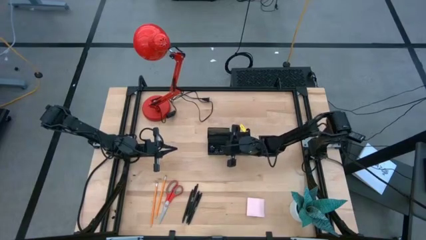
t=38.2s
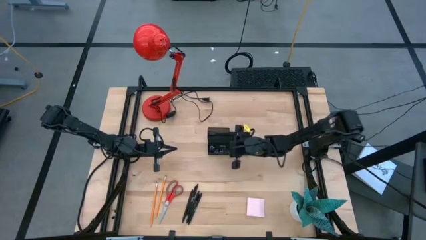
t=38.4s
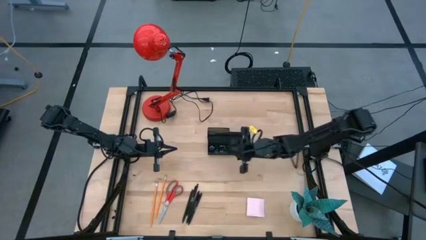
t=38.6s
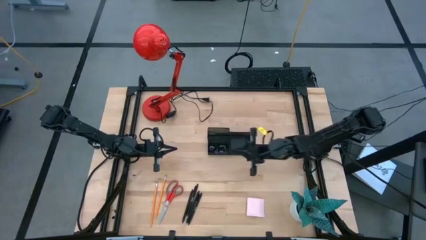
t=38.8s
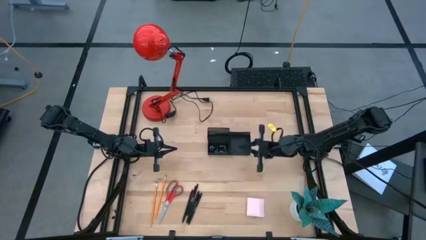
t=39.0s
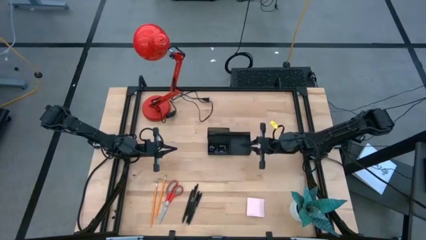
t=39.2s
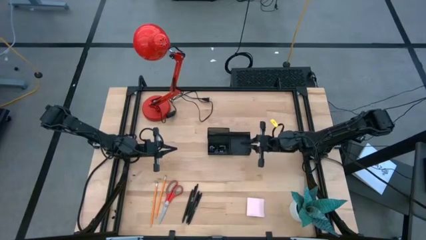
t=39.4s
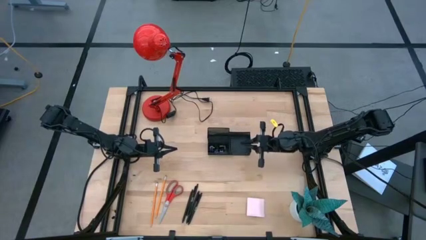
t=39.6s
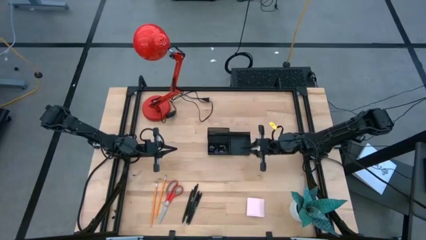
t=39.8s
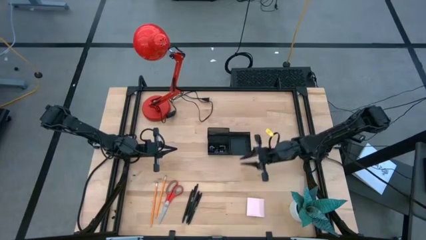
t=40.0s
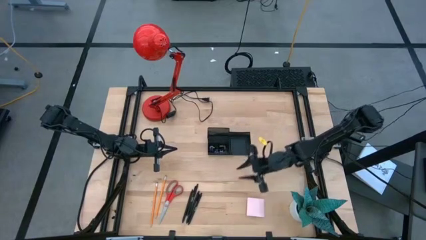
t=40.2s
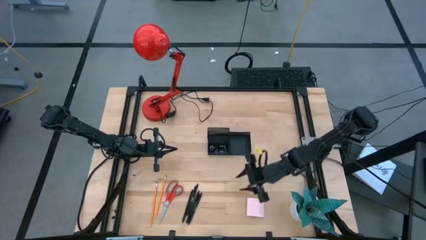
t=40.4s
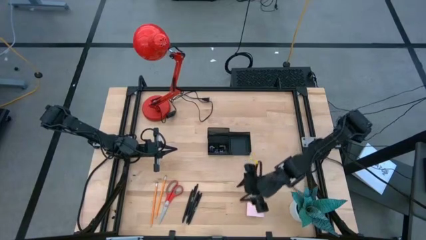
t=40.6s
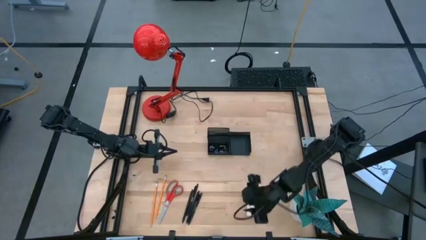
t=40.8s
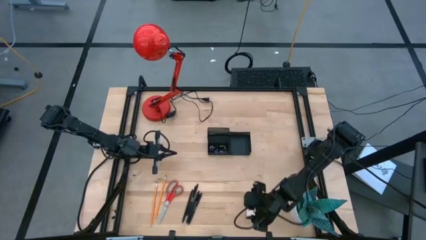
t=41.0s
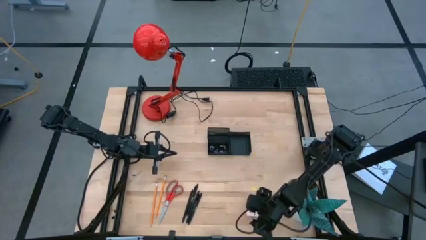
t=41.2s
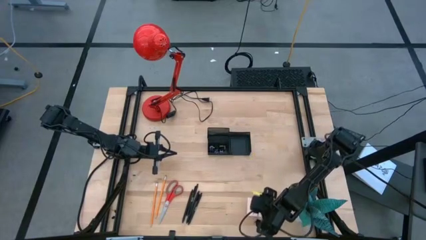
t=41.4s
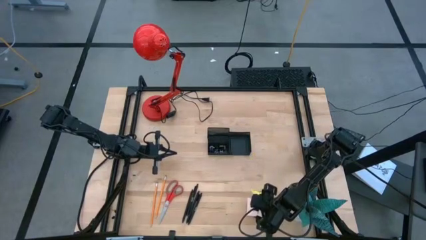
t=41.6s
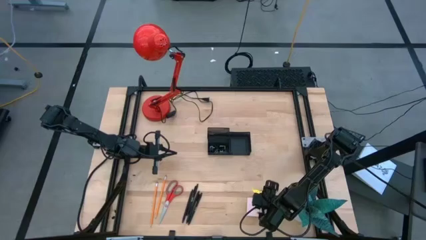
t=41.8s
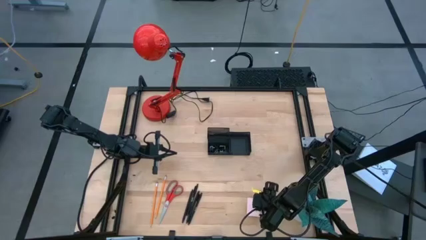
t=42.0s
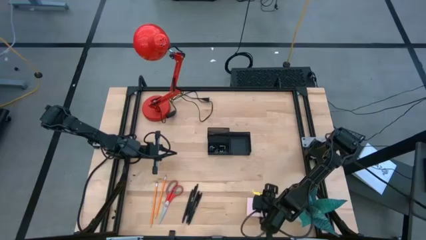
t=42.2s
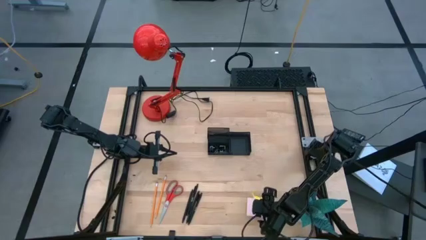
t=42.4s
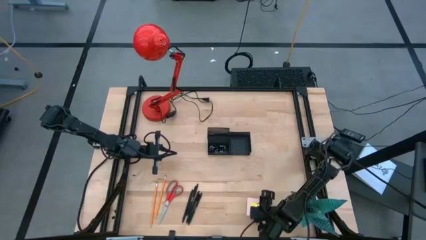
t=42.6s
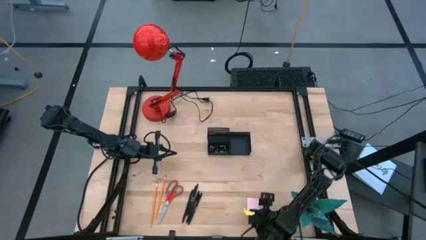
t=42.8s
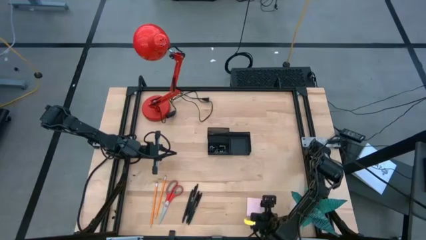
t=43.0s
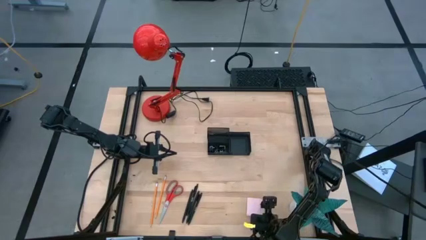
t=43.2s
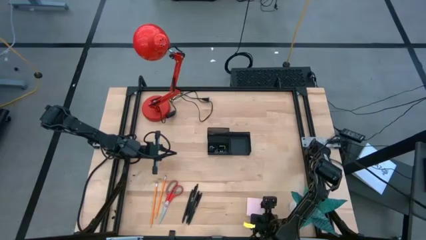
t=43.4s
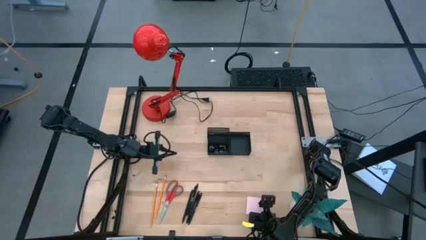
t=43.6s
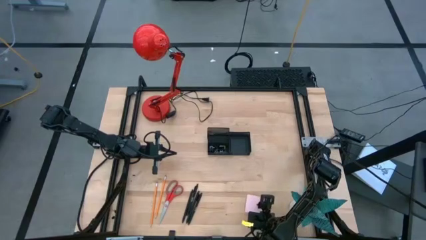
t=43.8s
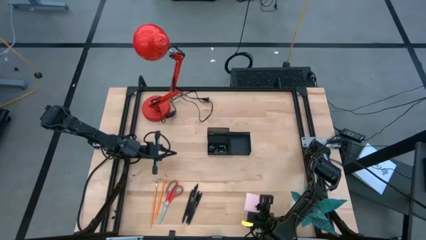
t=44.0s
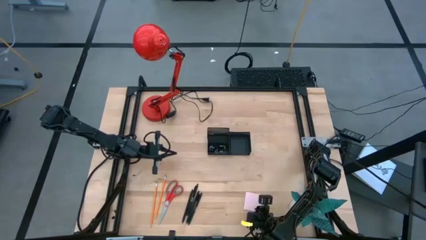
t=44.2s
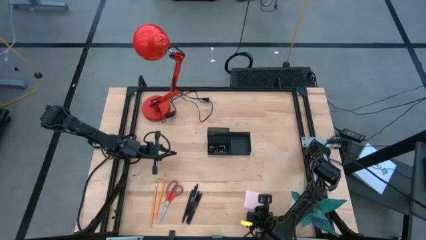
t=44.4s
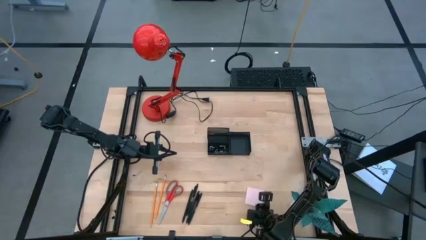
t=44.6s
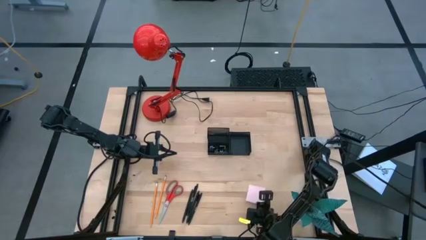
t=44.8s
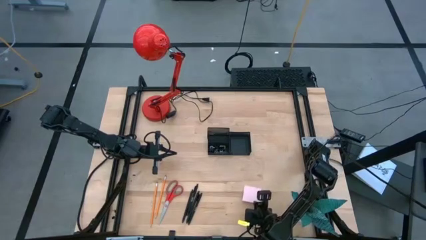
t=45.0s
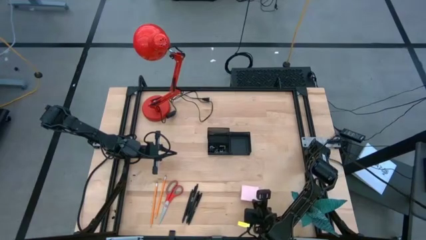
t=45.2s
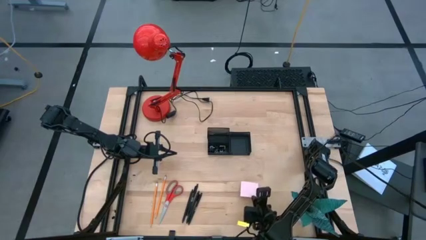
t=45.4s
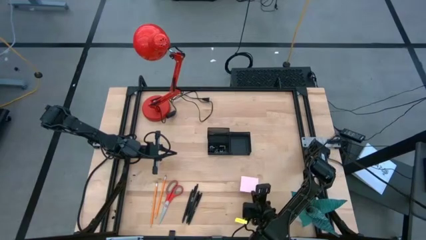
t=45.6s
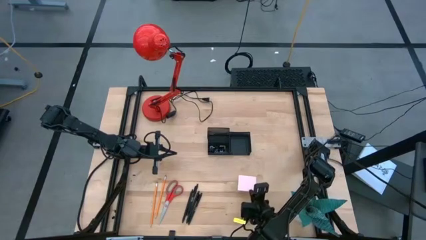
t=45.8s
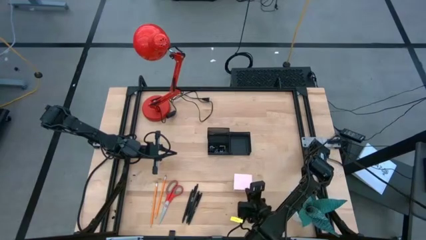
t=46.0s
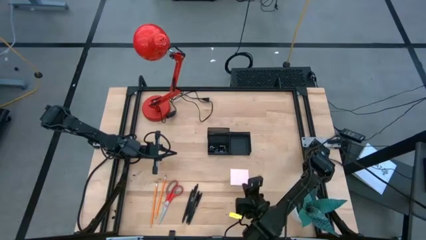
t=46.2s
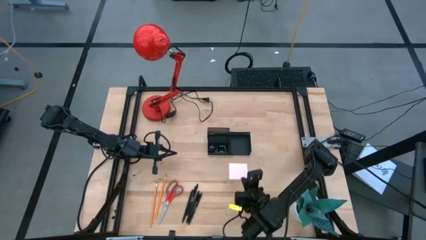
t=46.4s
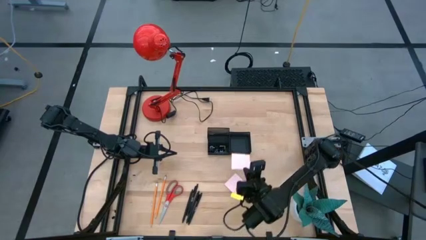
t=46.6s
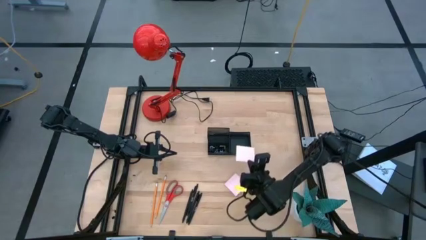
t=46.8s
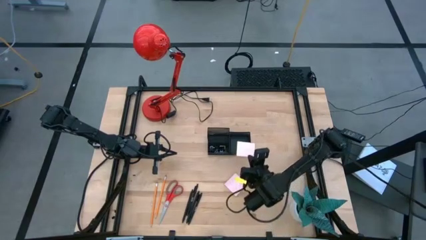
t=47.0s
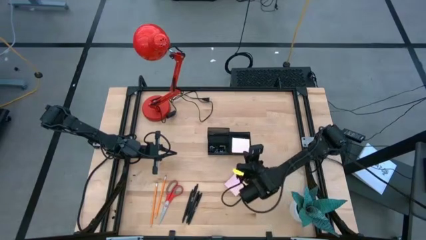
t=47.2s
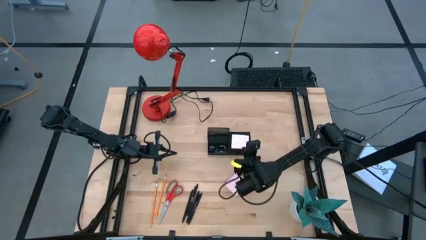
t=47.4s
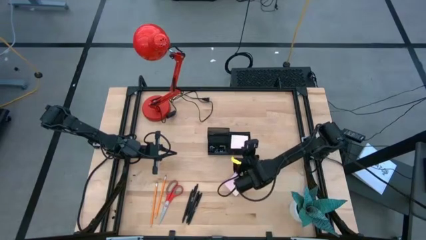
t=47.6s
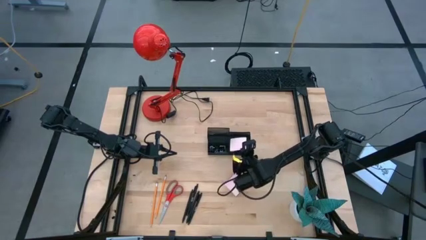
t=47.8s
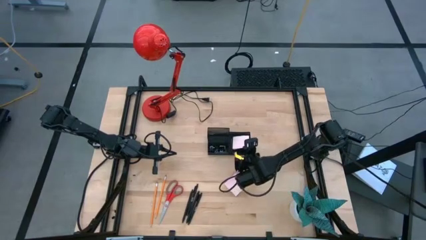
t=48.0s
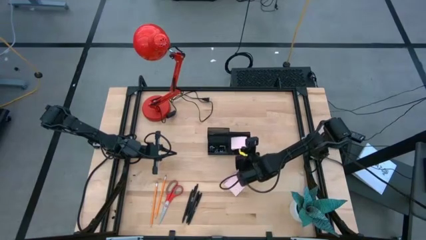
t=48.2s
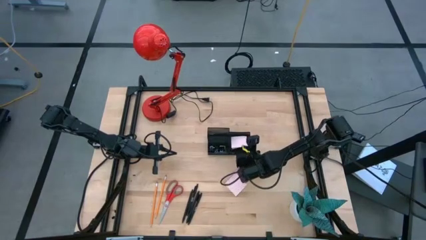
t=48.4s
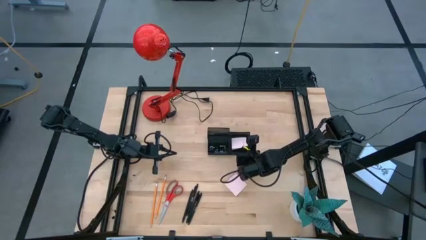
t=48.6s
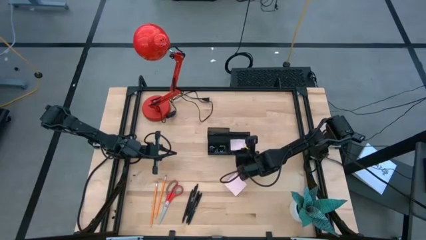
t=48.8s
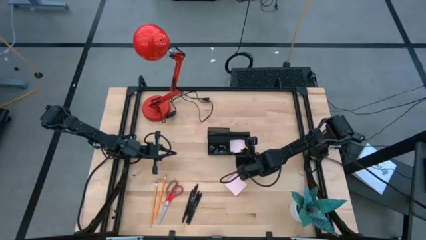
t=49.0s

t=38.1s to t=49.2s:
Task: Pick and place office supplies into organizer
Put the pink sticky notes into the black desk organizer
